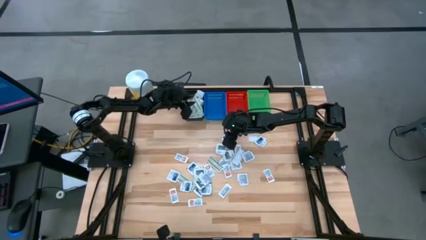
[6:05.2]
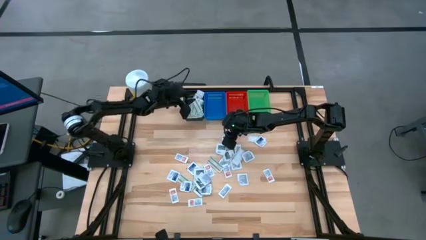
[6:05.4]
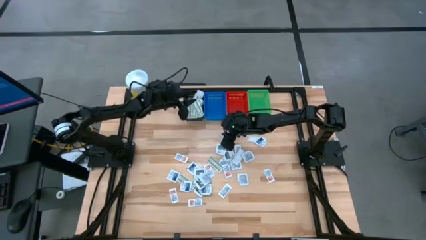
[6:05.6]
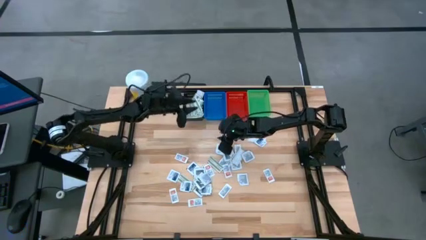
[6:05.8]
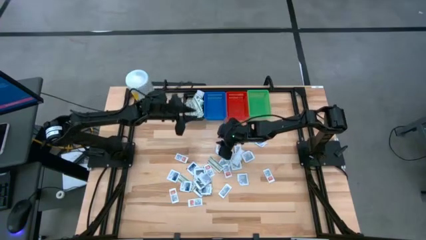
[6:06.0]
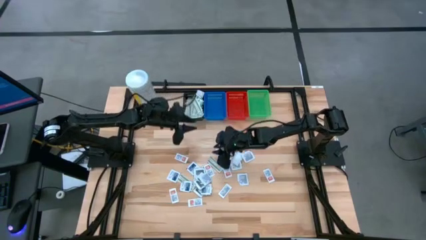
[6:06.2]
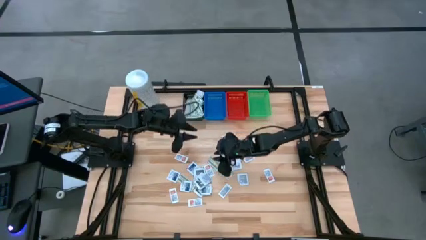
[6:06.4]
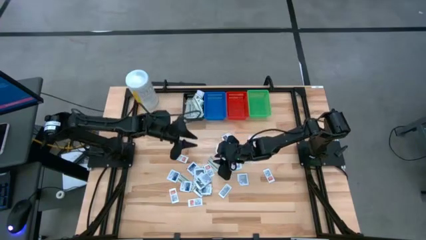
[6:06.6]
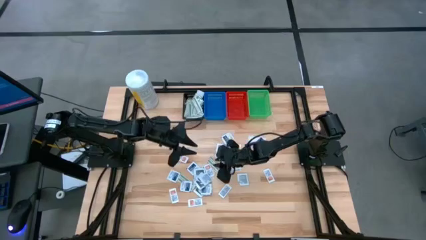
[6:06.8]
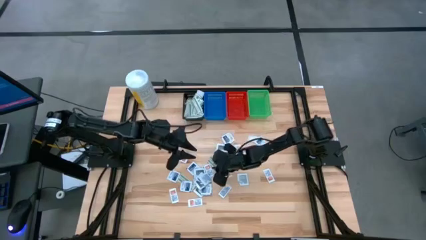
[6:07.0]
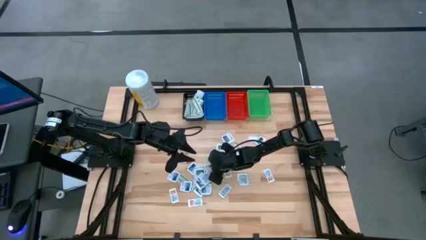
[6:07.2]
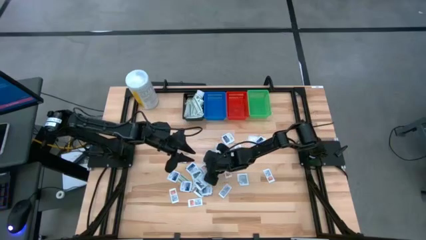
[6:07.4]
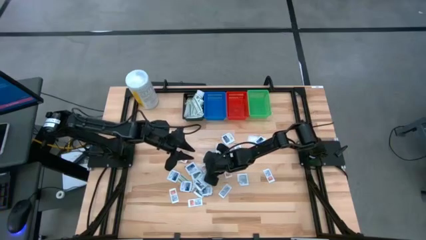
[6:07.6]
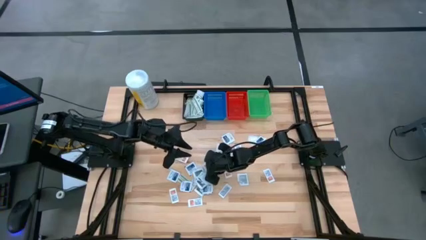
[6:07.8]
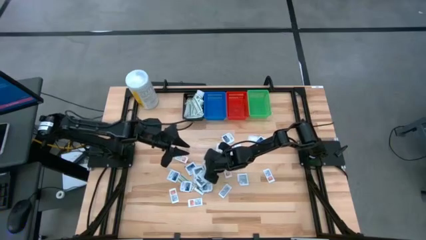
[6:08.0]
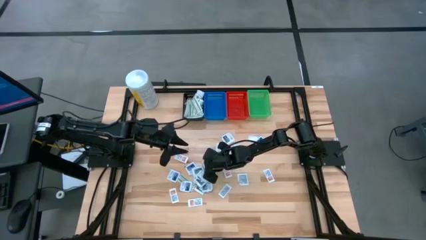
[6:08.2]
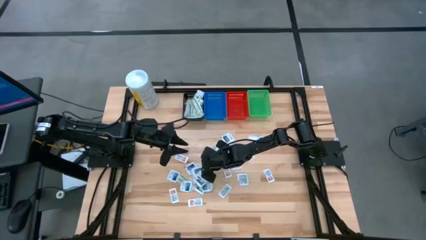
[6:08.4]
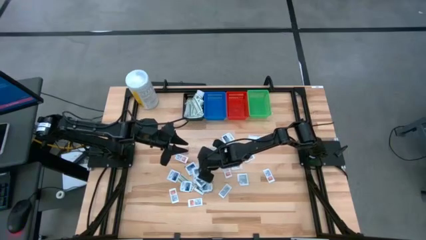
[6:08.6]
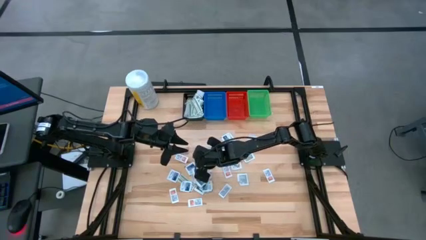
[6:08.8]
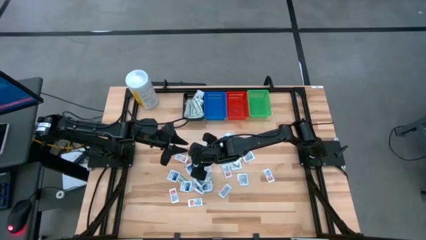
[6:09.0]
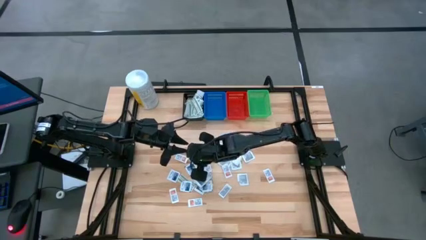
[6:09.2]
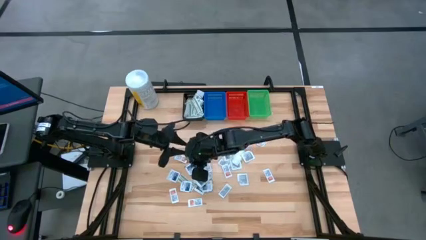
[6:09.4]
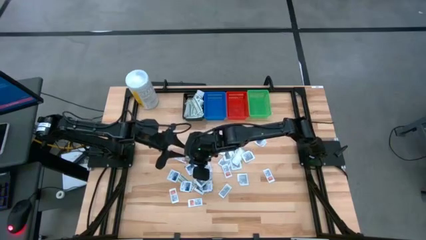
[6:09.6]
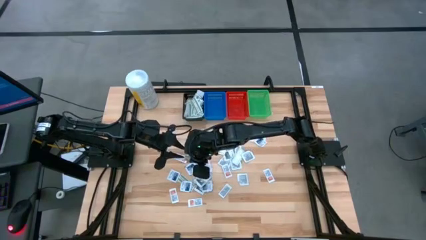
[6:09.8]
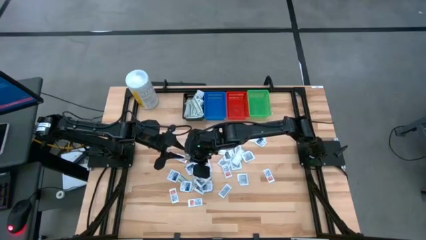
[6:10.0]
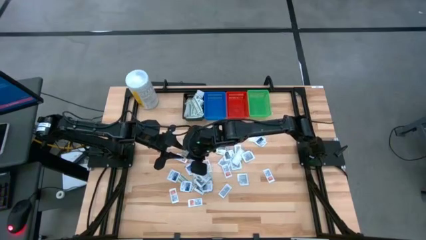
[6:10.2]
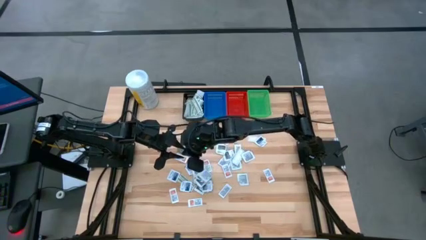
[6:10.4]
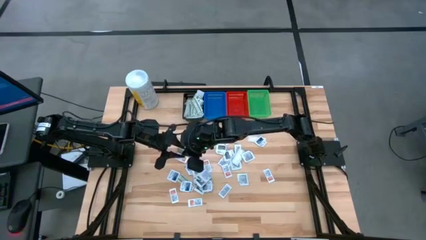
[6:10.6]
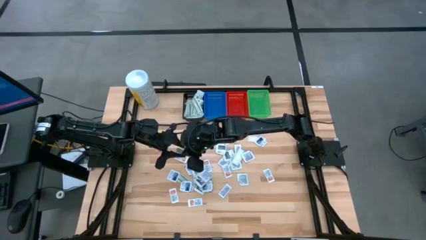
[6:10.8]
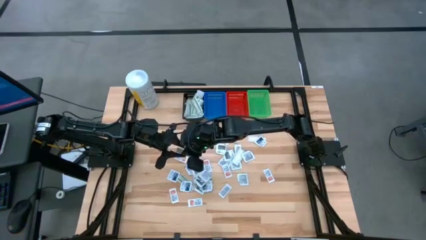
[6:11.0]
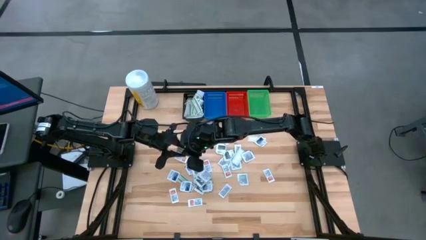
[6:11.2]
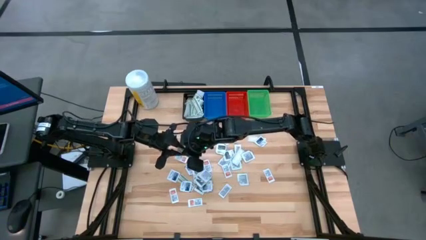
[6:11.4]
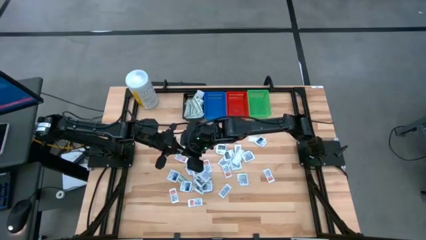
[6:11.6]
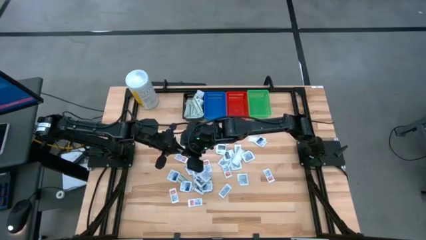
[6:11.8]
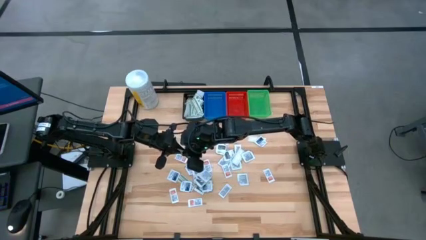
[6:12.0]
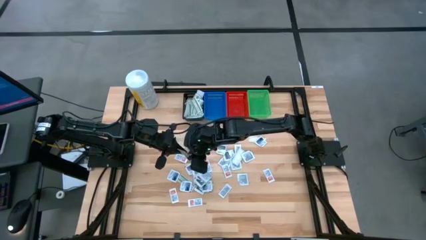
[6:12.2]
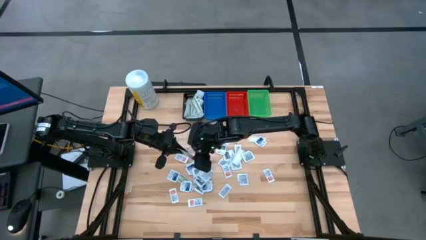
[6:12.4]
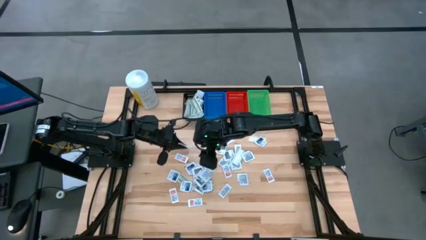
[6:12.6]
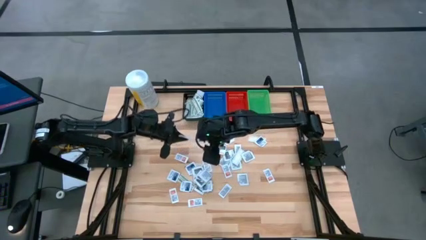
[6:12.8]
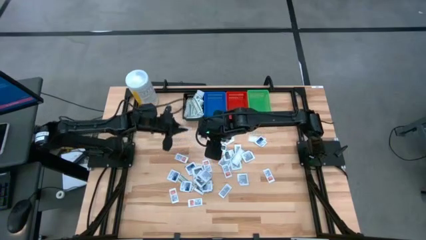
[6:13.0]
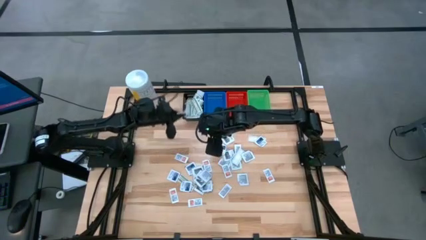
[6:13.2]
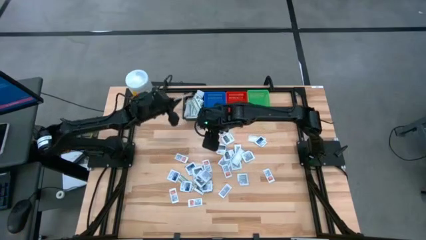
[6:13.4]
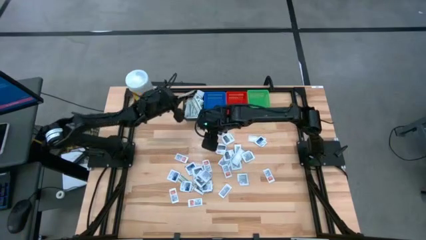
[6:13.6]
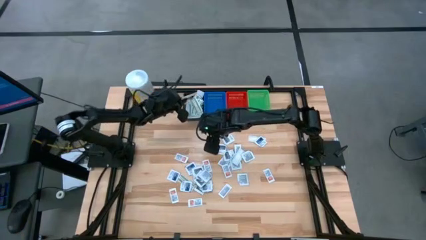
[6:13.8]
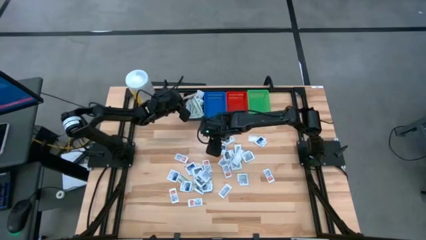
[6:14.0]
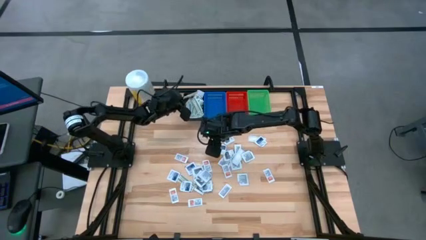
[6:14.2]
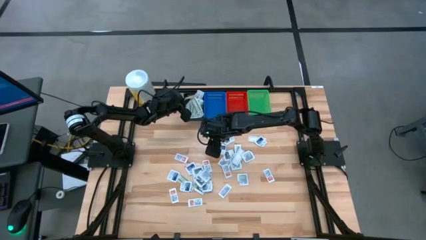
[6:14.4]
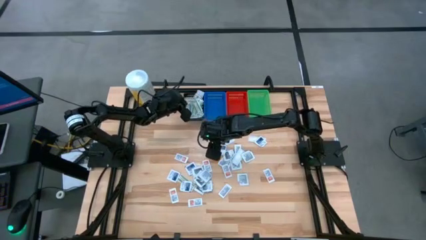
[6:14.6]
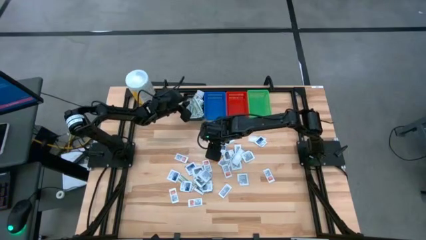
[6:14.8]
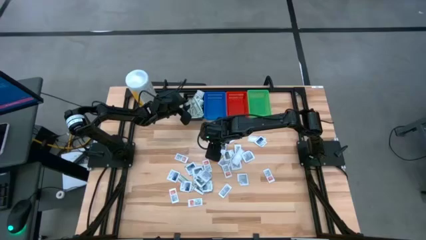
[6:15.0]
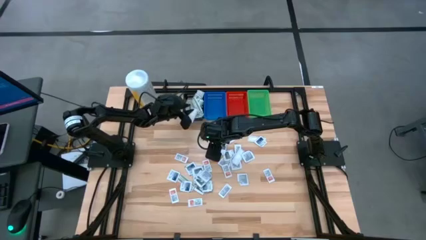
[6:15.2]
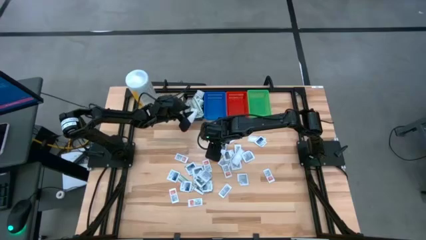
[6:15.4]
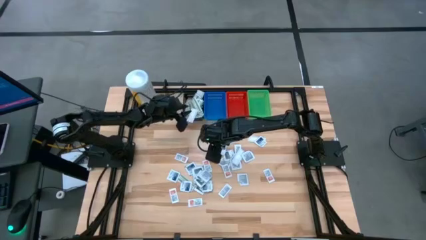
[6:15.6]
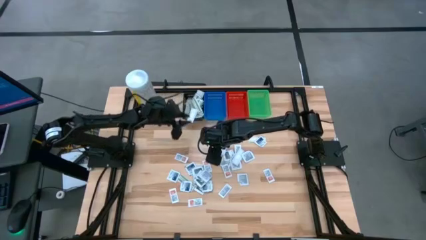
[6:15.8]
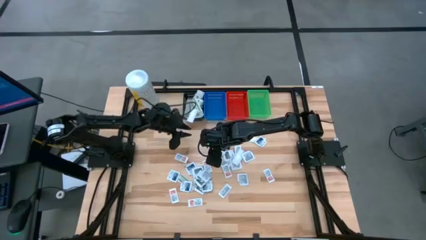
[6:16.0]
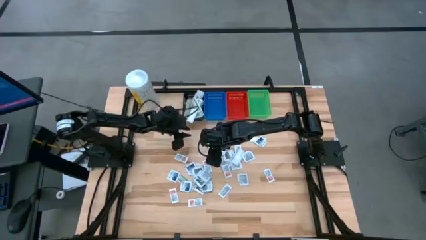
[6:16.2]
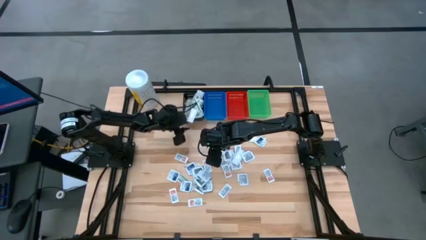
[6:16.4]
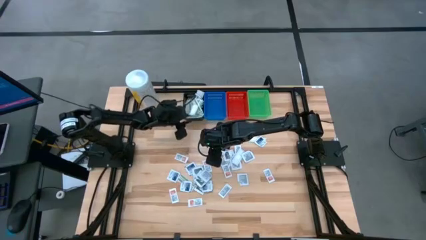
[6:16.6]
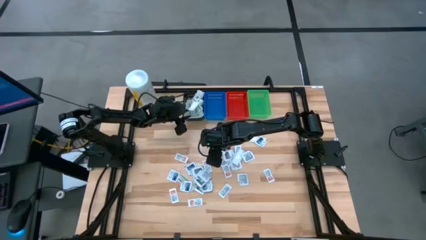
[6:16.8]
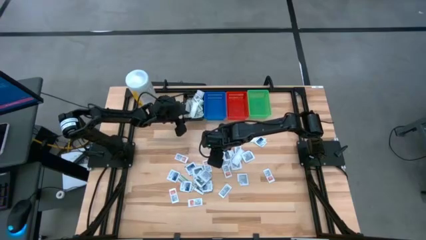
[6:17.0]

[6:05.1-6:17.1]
Task: Pick & Place First Aid Supplies
Put the green bandage pack in the black bin

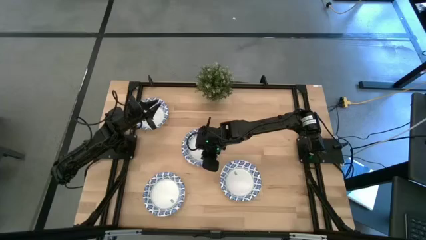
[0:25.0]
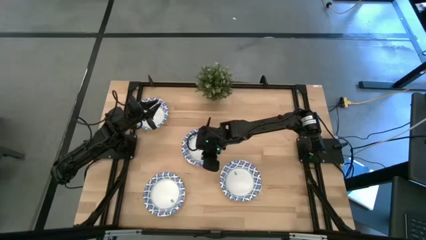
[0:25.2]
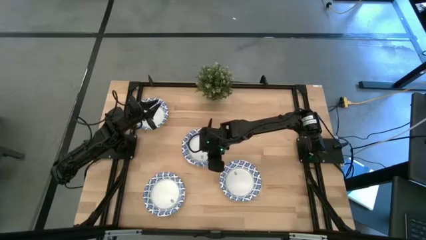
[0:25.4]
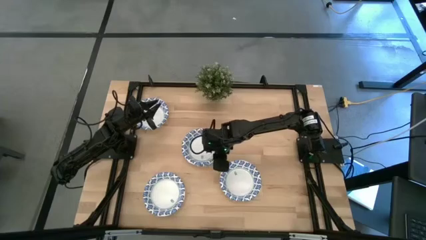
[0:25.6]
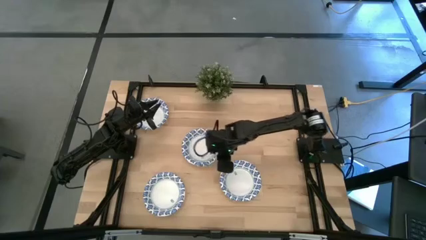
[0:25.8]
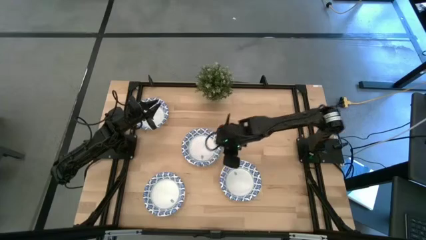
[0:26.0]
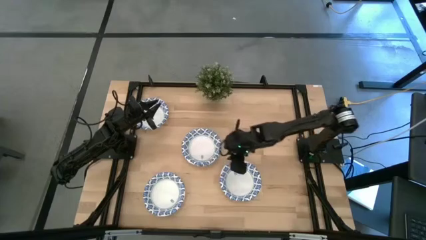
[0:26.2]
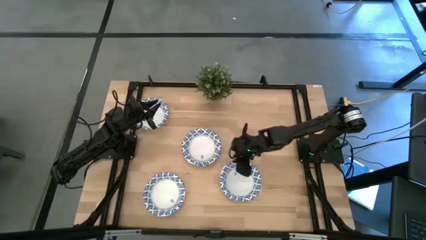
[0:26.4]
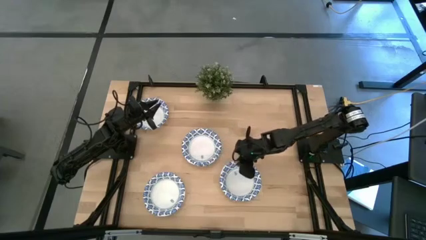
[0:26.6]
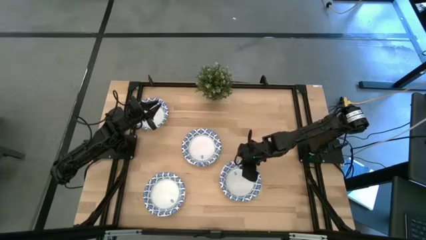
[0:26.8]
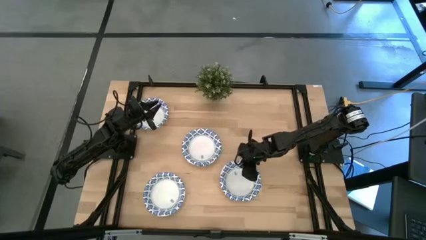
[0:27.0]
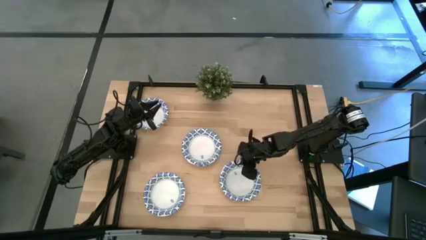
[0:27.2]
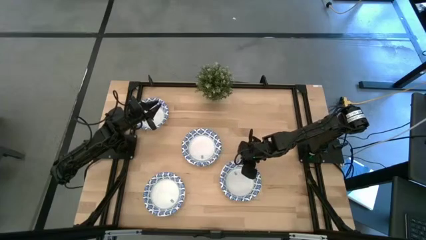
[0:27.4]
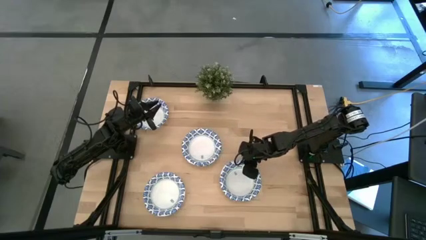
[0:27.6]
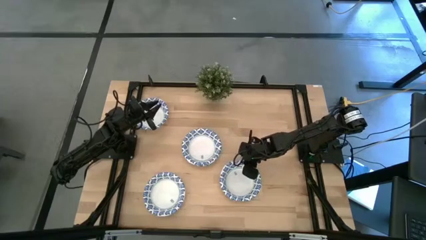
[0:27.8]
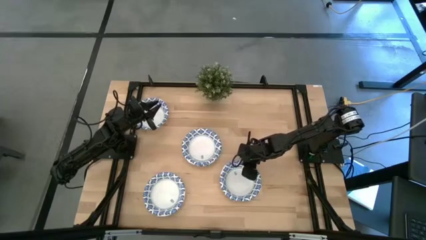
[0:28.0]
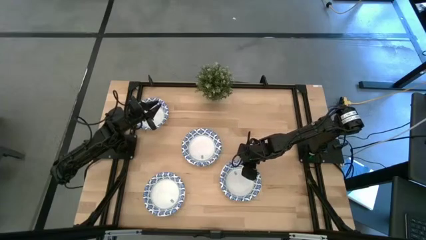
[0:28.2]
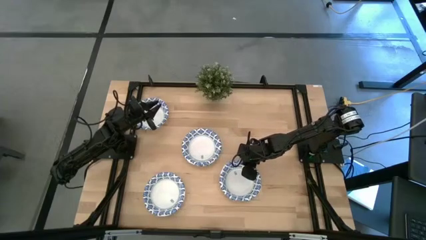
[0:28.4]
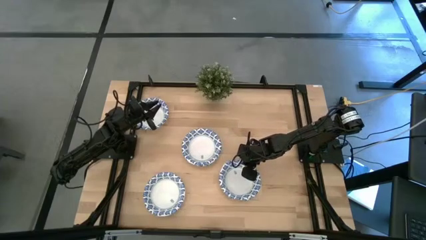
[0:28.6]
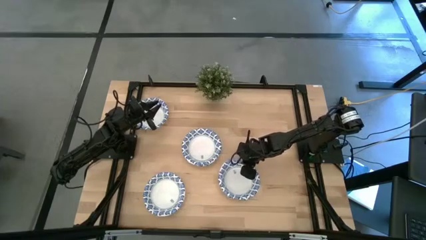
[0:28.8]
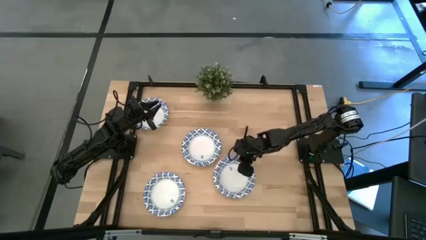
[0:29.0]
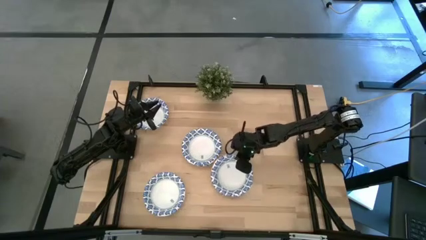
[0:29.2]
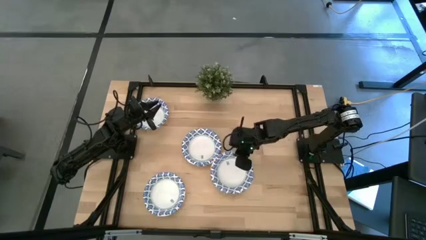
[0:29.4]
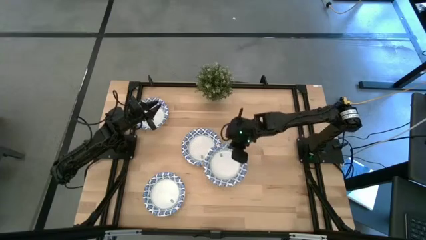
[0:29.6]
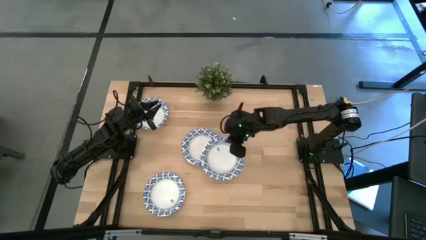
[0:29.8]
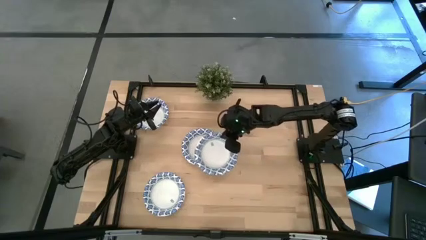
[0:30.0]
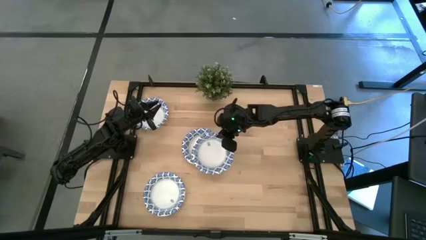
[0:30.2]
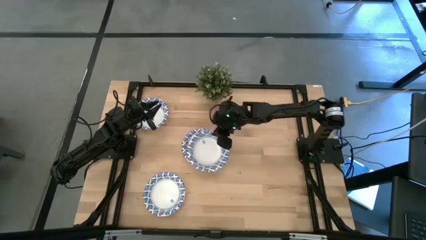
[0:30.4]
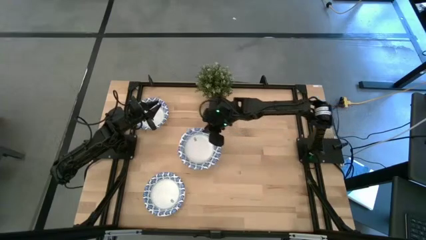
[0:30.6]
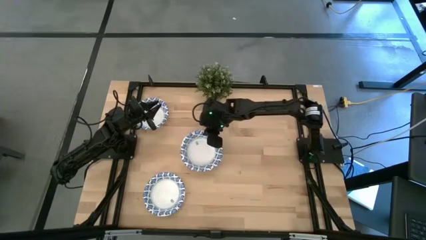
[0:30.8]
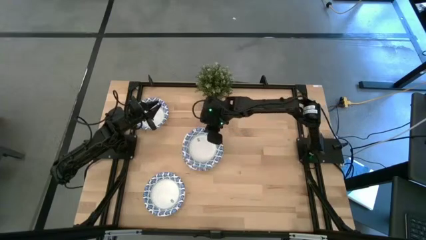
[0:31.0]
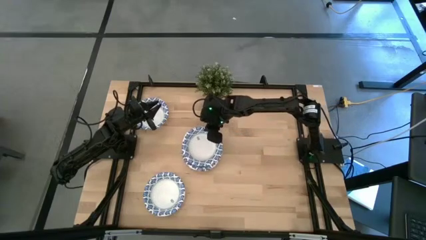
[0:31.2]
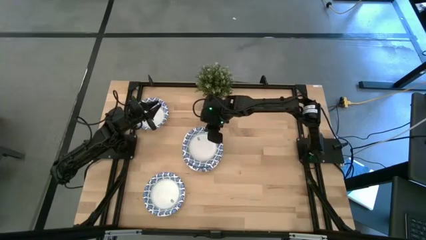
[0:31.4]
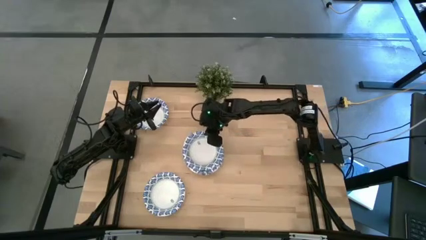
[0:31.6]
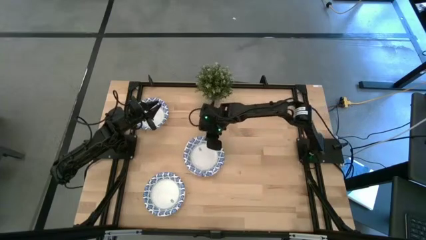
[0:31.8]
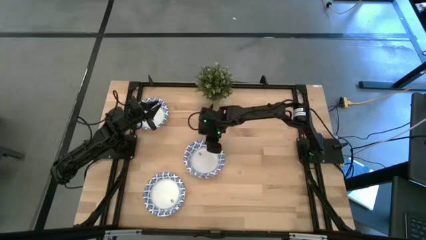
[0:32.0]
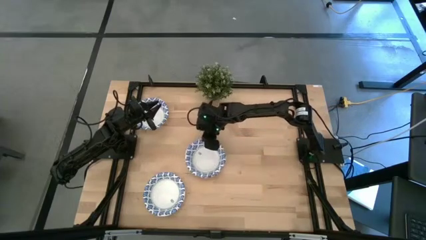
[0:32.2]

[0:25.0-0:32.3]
Task: Nest bowls inside each other
Stack the white bowl on the stacked white bowls
